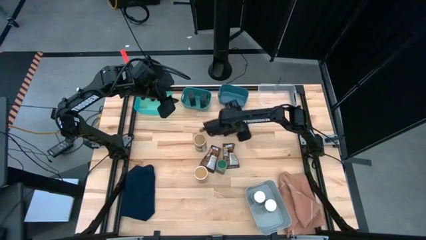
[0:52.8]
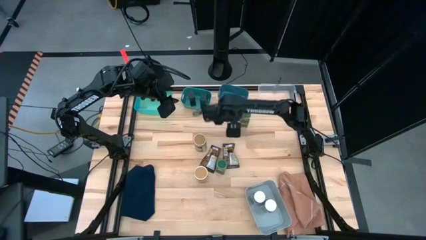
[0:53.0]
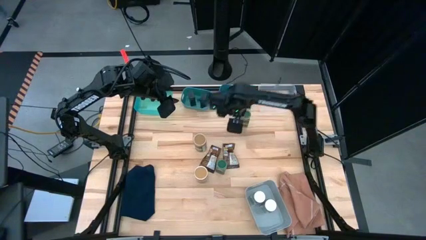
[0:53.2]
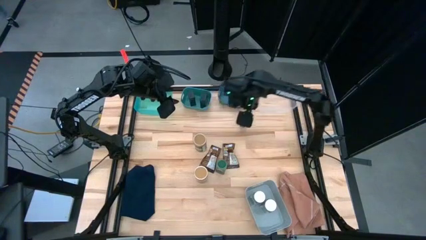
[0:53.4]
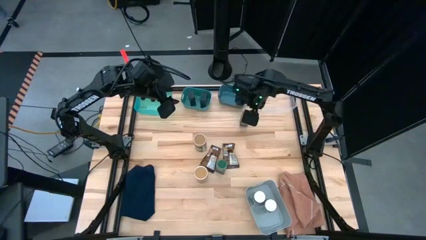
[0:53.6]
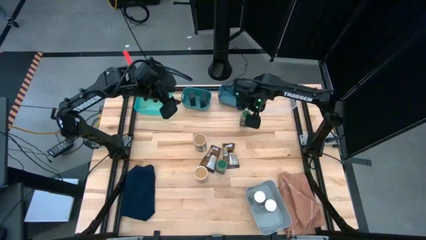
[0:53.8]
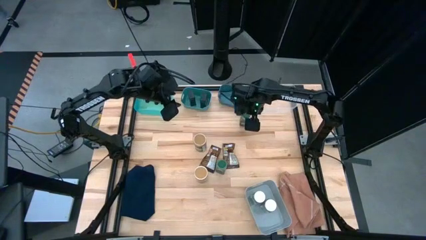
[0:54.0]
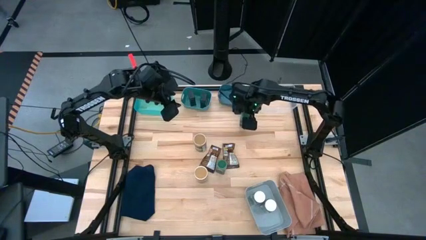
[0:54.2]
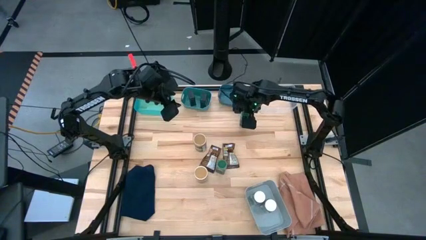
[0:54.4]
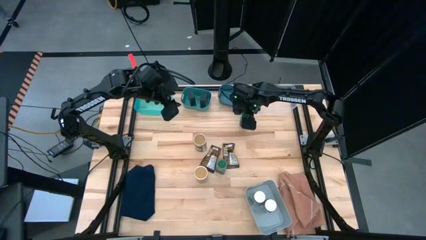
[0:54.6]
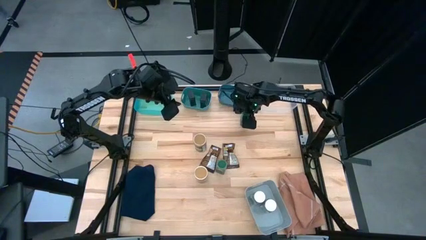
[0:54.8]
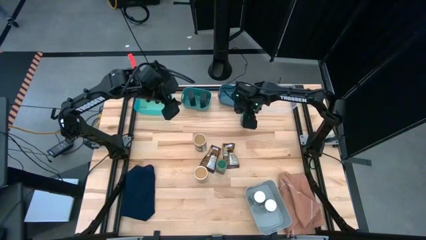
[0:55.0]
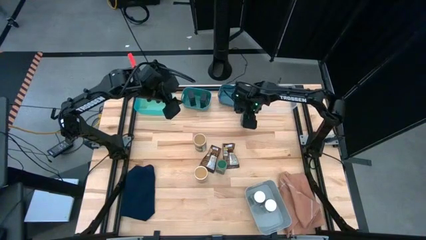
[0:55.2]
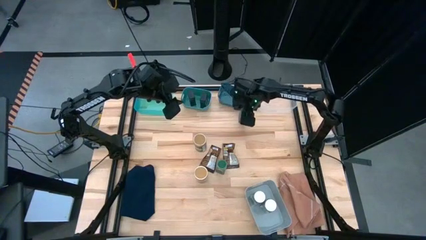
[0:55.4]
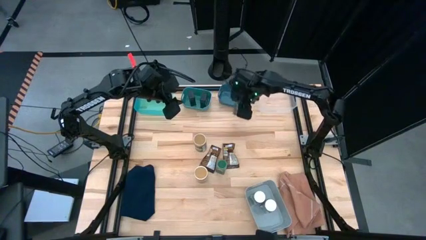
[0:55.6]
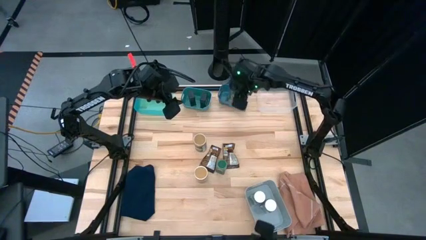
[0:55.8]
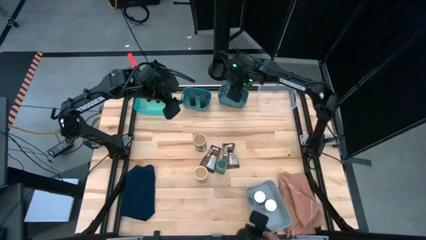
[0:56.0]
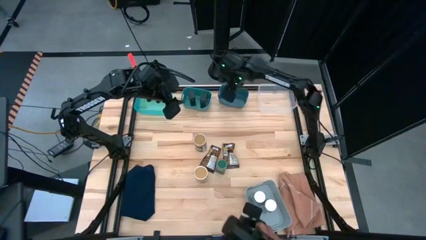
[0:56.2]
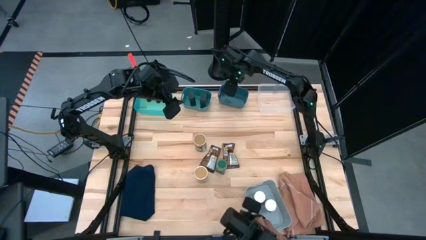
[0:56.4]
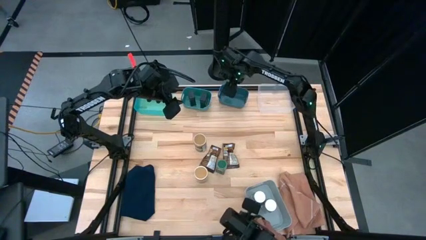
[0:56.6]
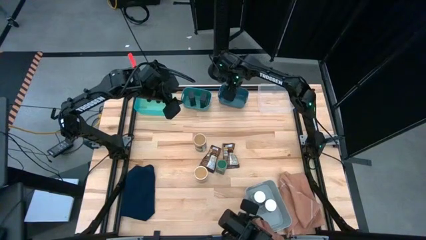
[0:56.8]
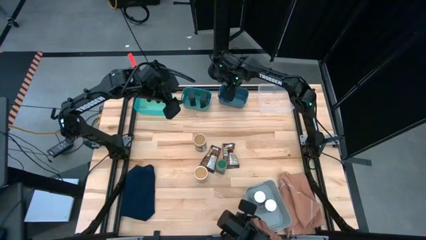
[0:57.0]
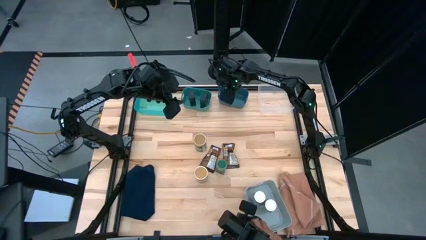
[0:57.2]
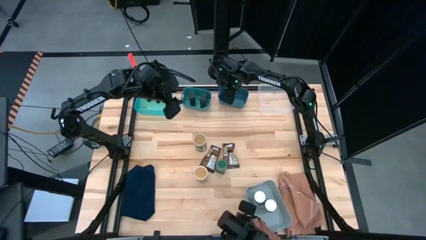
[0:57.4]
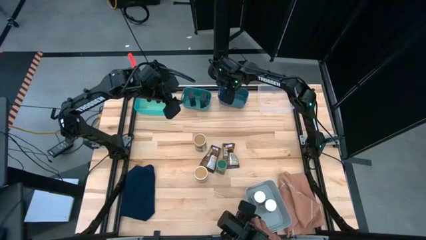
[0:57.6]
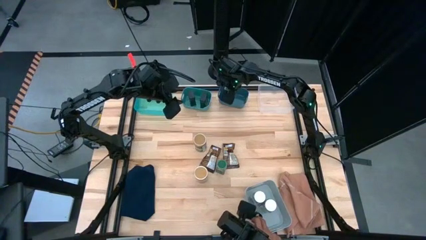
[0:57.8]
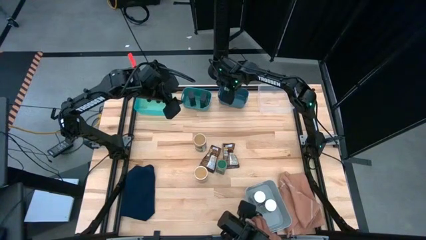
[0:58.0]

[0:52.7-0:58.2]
Task: Sort spices by type
Put the top green seasoning bottle into the blue bin

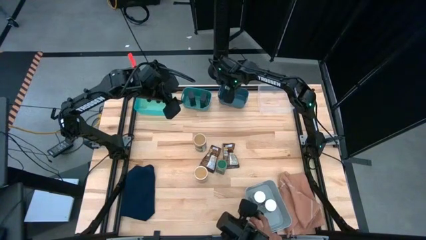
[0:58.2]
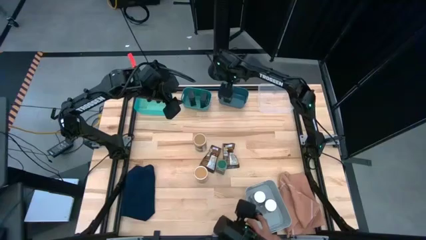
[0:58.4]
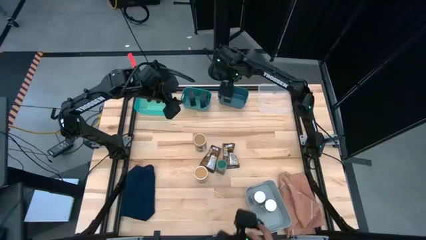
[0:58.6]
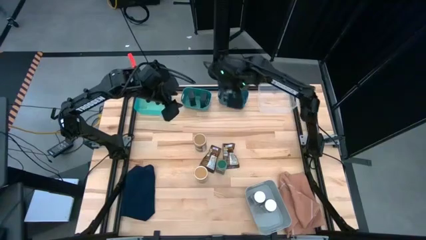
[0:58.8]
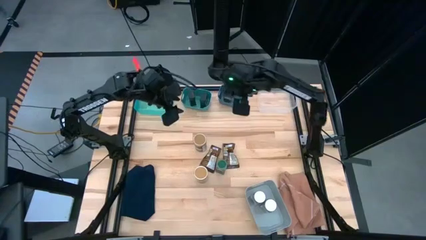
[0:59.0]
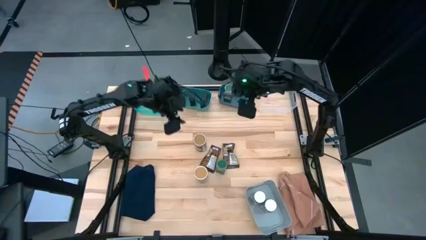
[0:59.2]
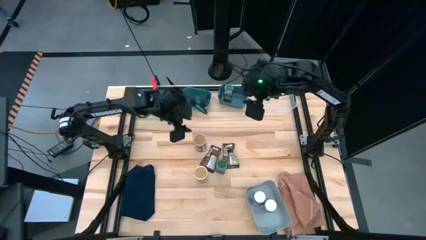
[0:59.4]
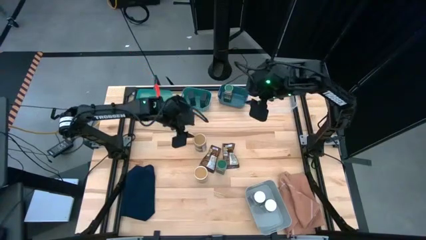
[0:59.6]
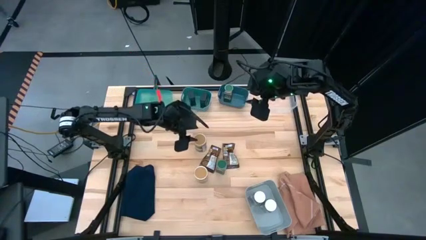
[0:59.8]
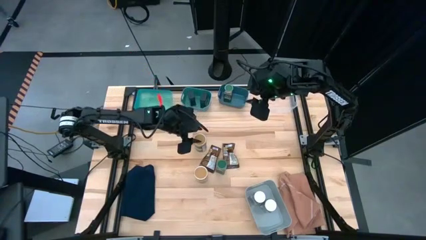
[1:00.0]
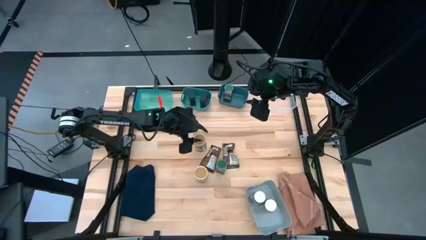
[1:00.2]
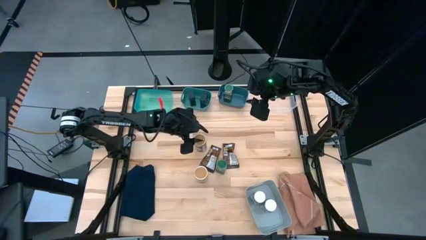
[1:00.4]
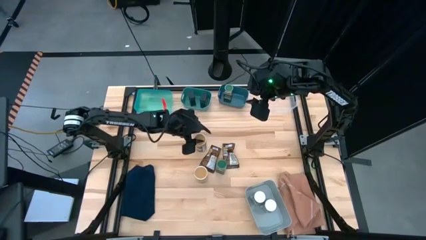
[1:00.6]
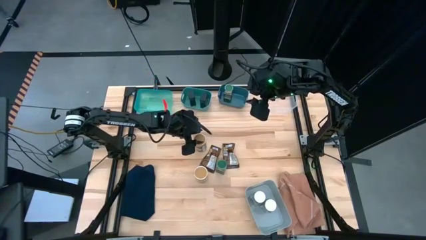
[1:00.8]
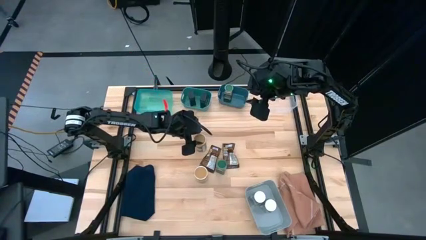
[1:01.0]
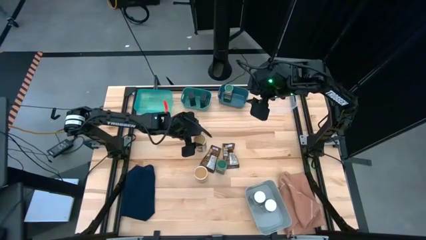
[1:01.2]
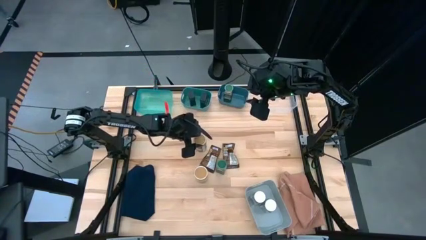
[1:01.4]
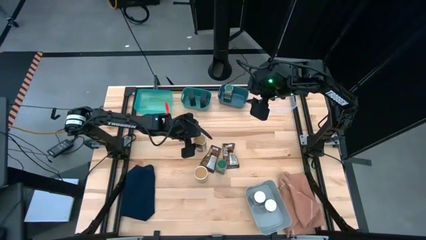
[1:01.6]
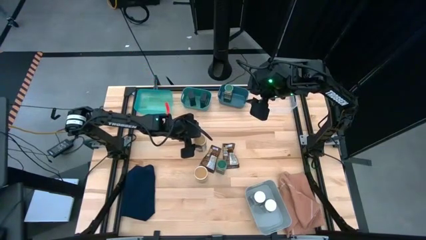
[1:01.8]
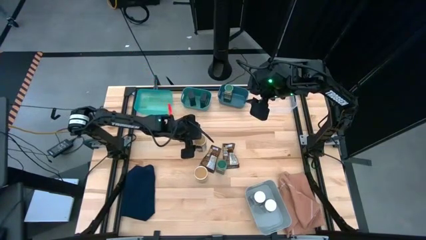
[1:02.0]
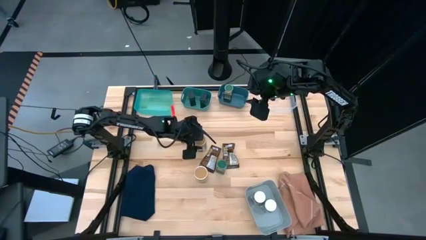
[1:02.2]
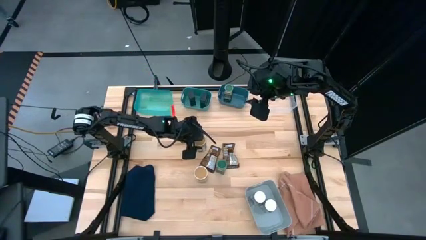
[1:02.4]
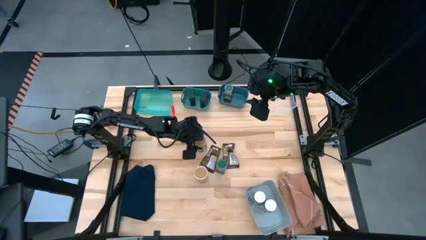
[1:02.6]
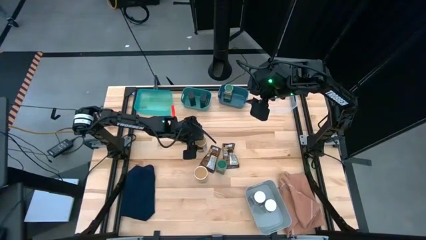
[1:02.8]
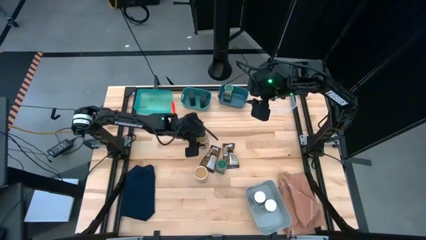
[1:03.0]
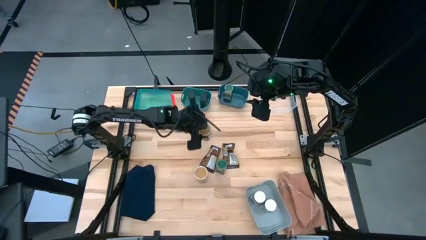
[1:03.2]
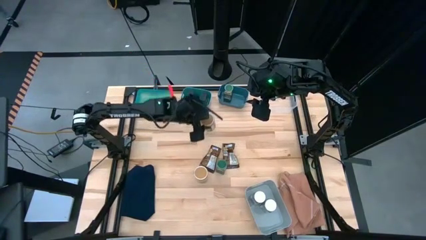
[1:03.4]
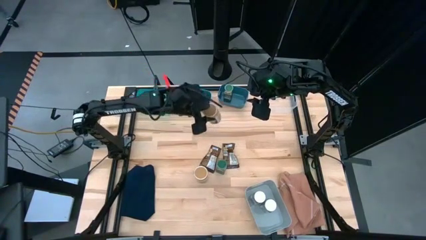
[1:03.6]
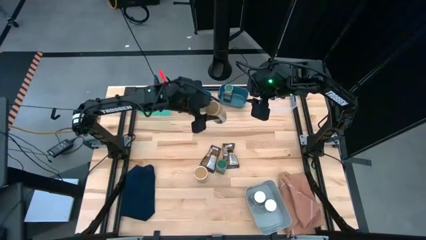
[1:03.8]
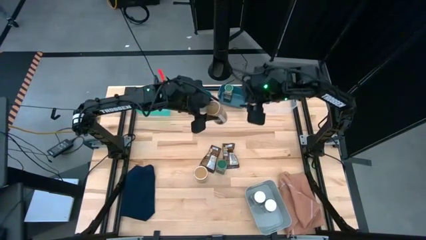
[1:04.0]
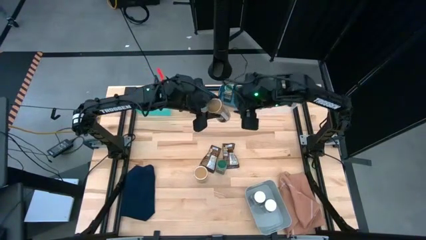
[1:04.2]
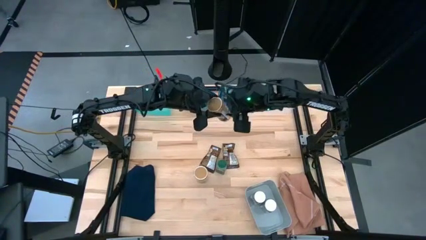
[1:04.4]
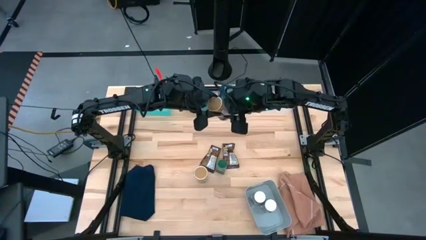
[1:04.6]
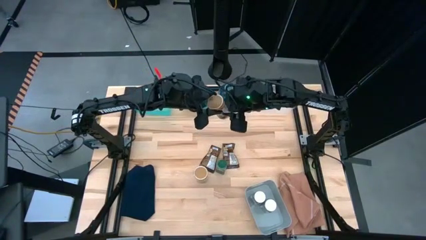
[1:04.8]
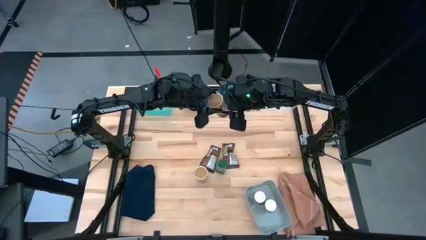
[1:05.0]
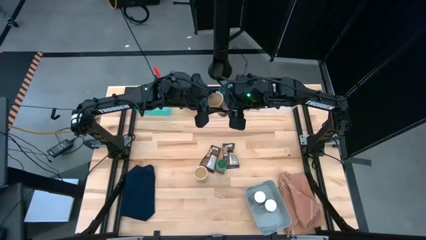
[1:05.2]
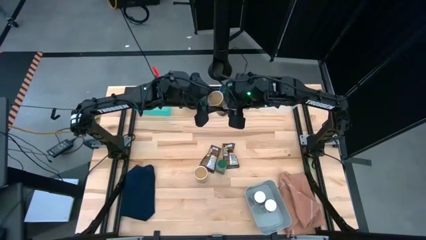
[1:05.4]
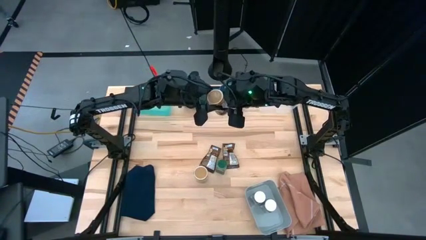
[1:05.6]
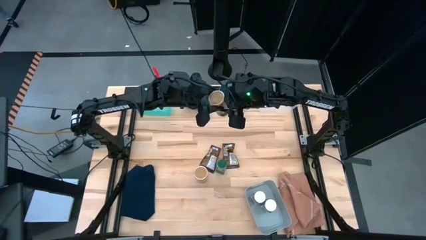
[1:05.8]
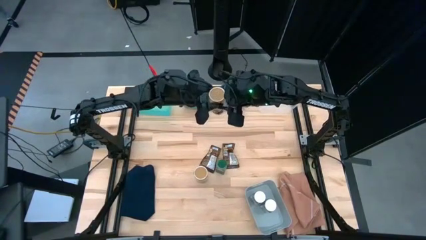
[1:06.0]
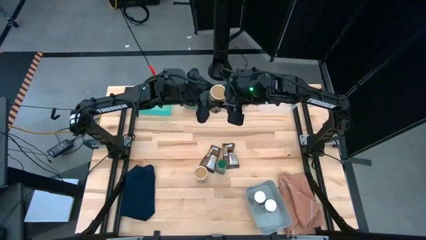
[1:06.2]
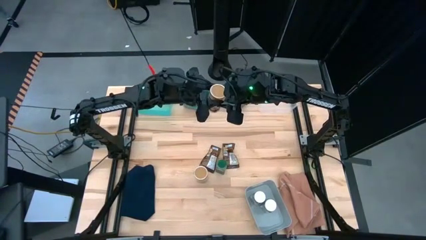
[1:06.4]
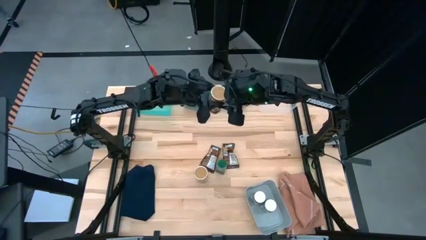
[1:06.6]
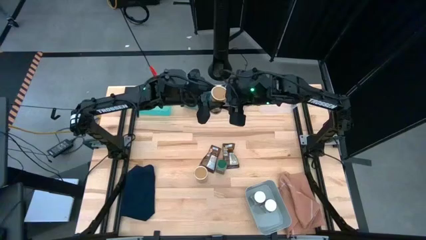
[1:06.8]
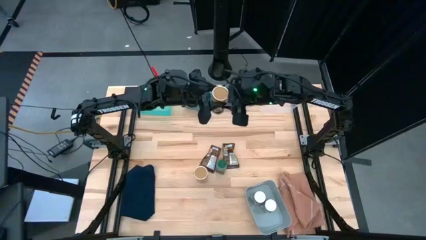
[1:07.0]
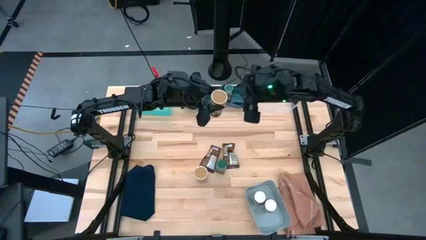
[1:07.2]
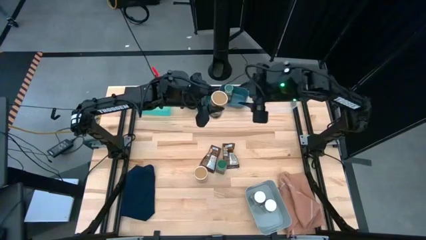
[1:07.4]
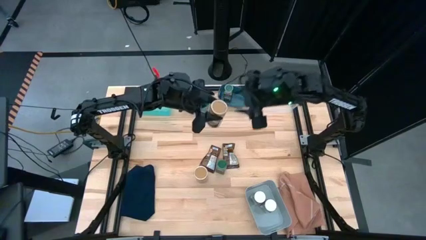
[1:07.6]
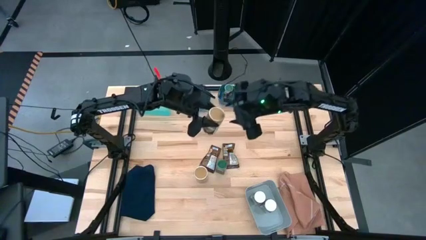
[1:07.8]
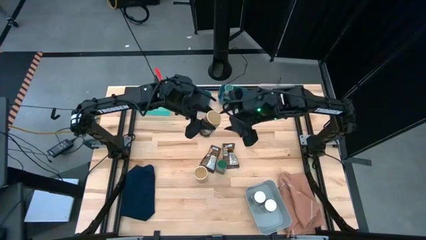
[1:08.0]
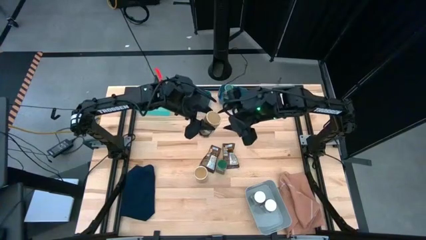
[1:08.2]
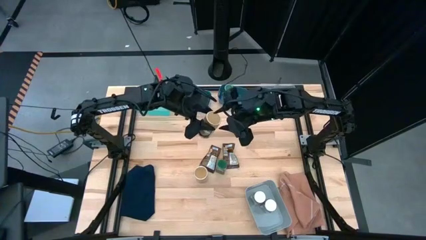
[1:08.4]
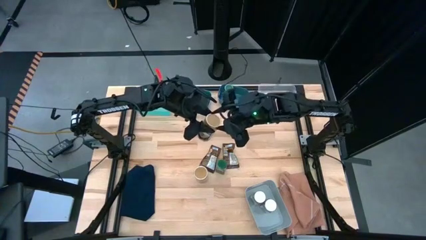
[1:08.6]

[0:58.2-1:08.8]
Put the top brown seasoning bottle into the transparent bin
